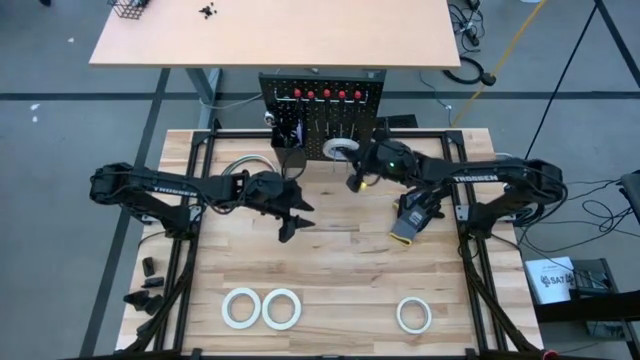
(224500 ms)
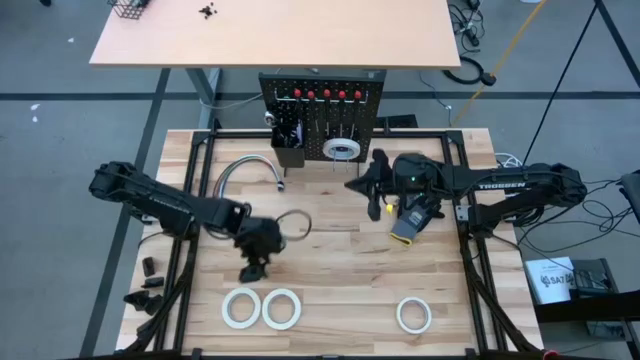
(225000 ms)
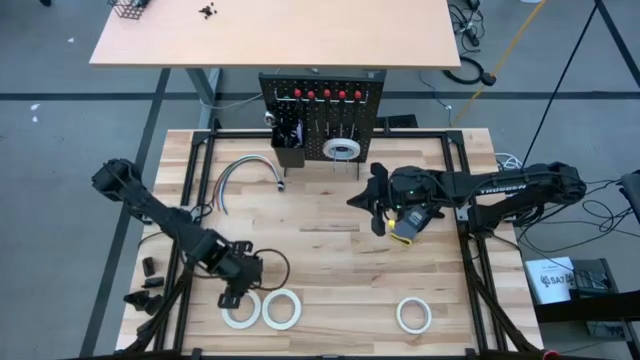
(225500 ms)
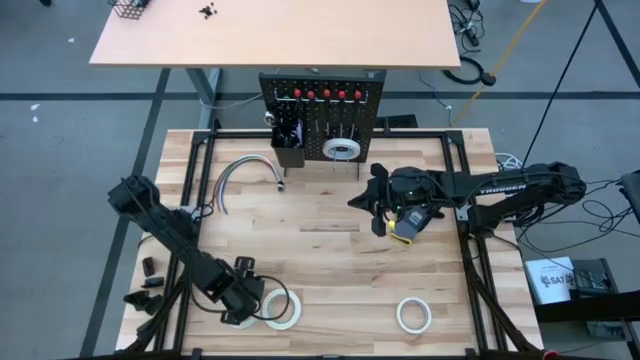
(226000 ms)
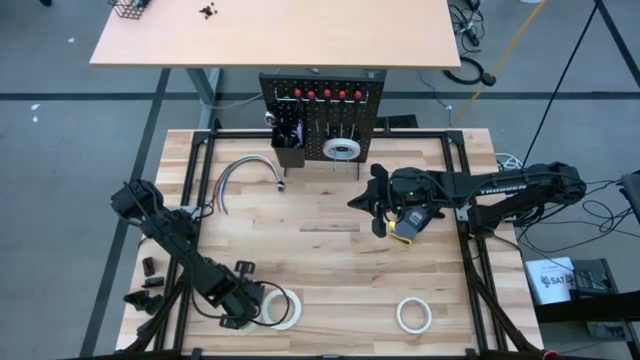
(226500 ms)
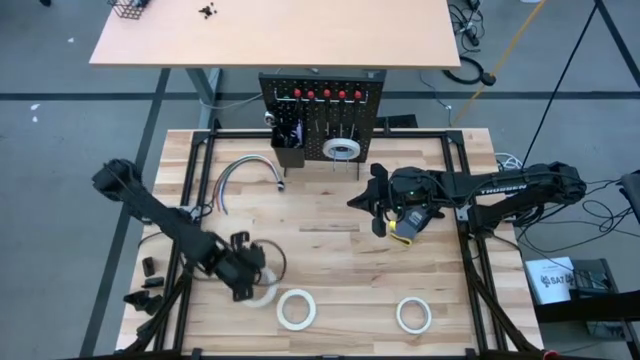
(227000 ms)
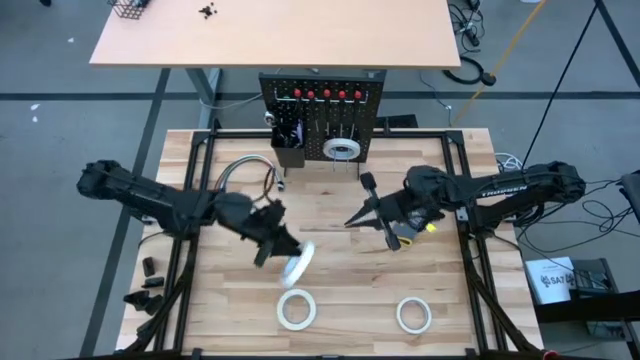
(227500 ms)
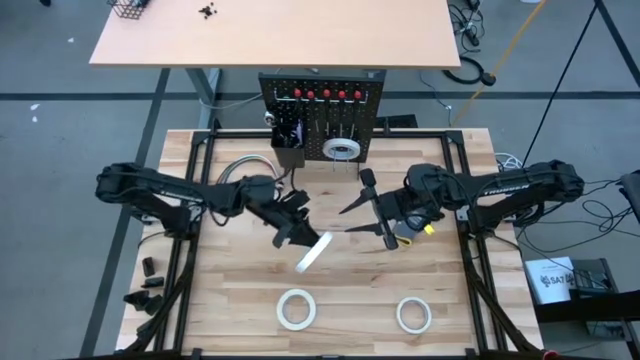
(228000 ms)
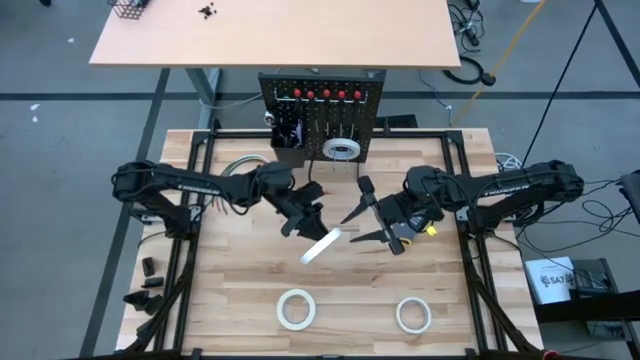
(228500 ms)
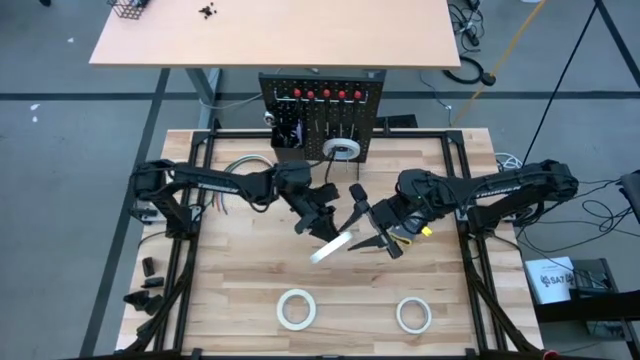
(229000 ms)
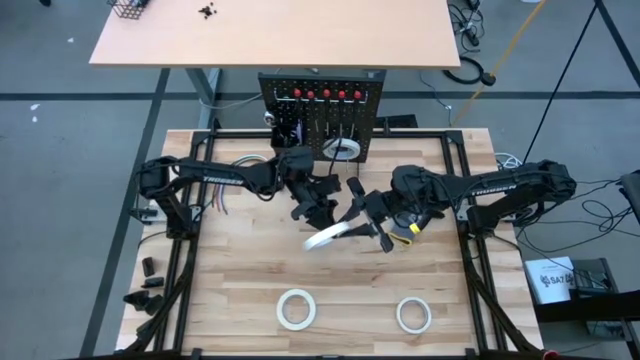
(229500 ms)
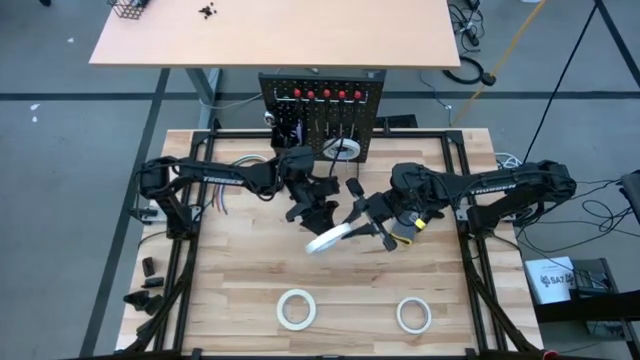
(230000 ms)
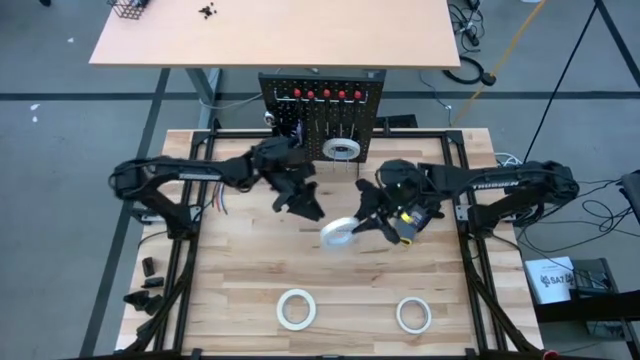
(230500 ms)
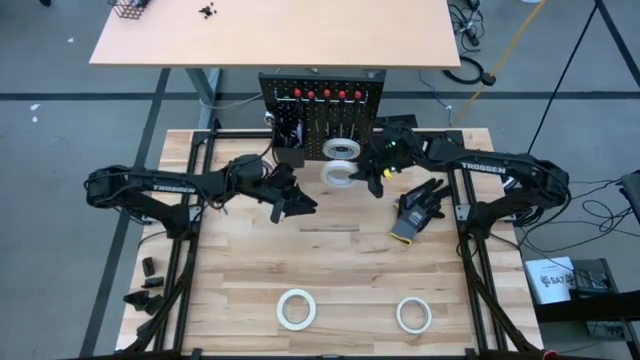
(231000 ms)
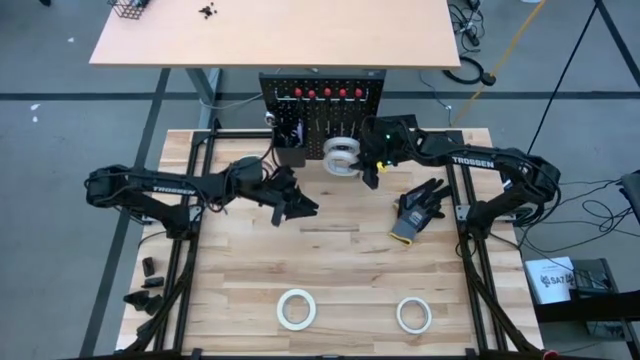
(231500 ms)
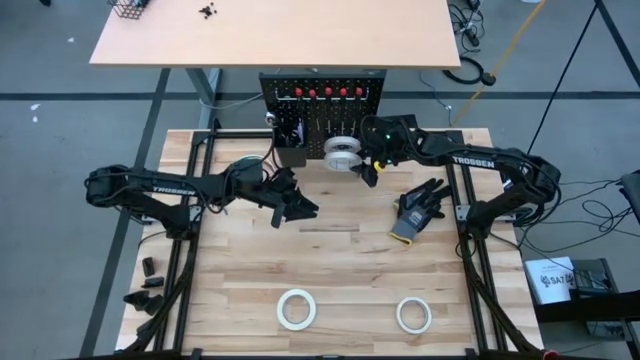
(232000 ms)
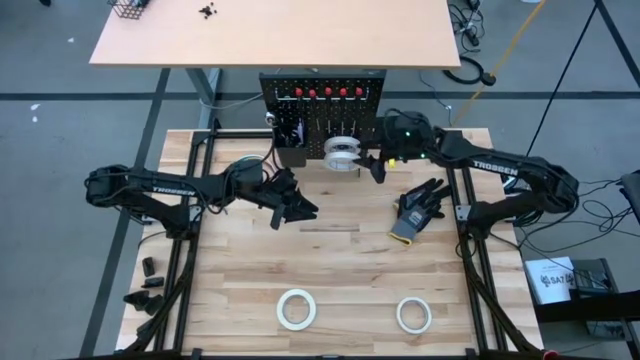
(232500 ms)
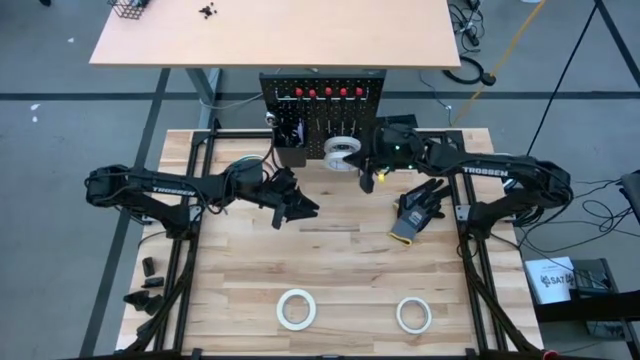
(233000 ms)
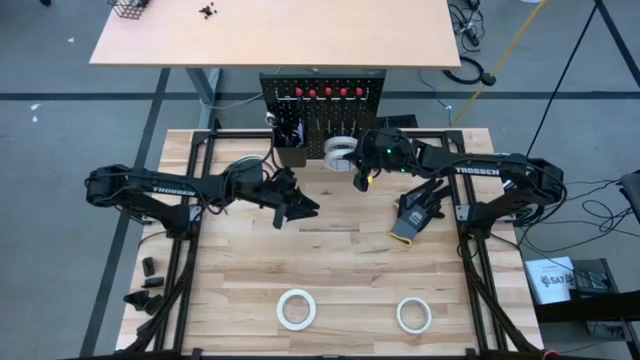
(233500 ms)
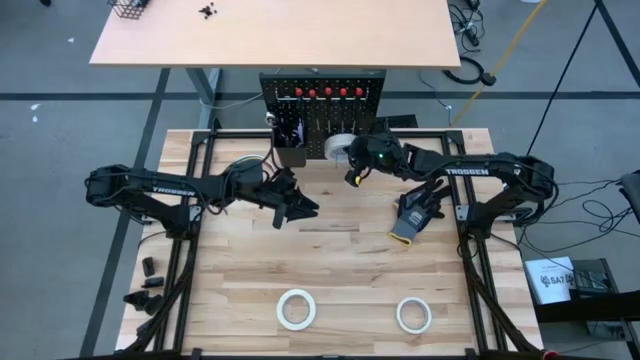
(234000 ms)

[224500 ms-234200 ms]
Task: Hang tools onto peg board
Hang the white tape on the peg board

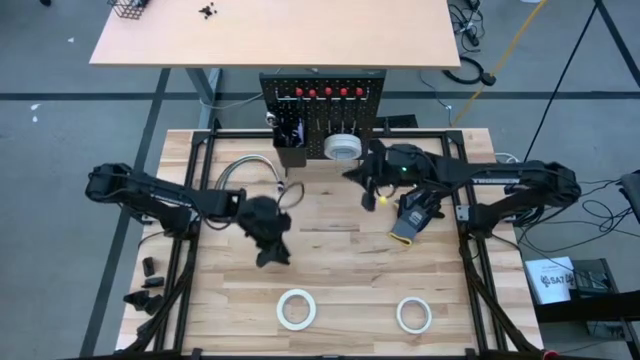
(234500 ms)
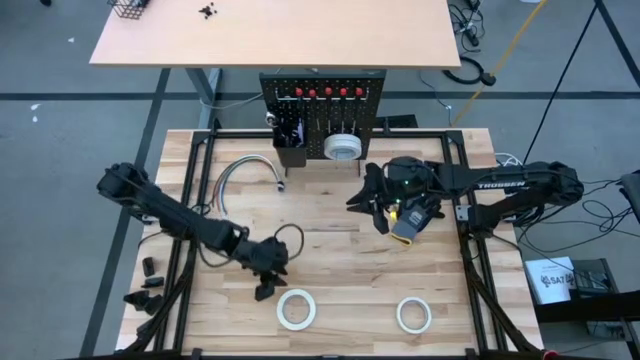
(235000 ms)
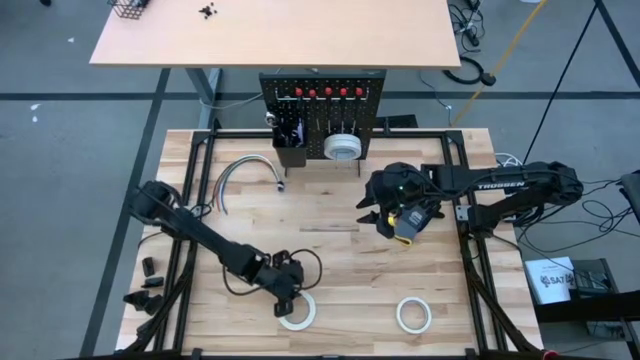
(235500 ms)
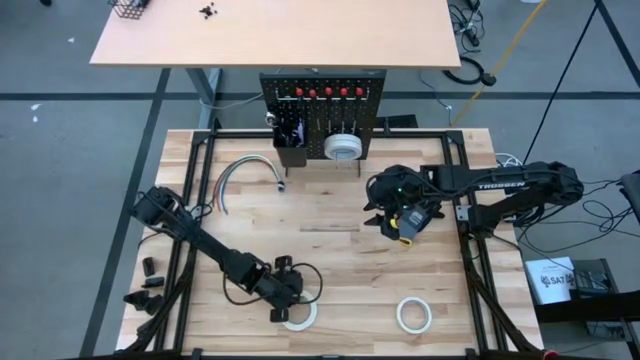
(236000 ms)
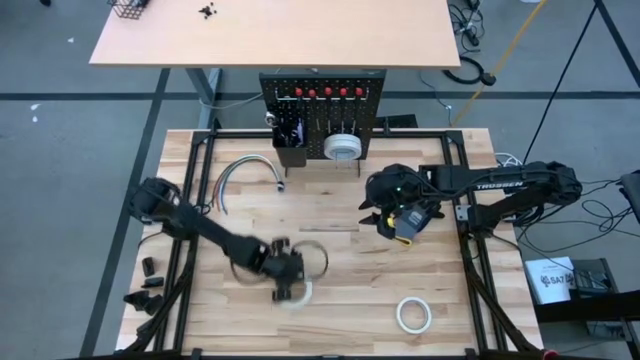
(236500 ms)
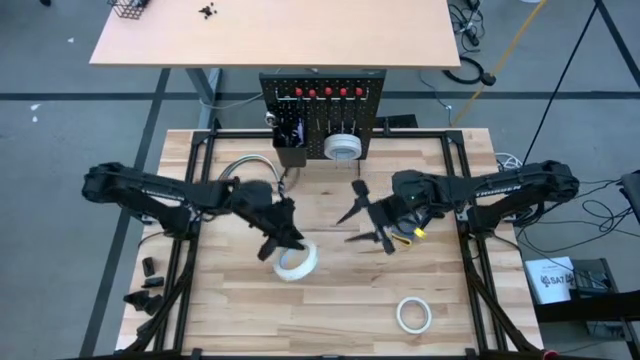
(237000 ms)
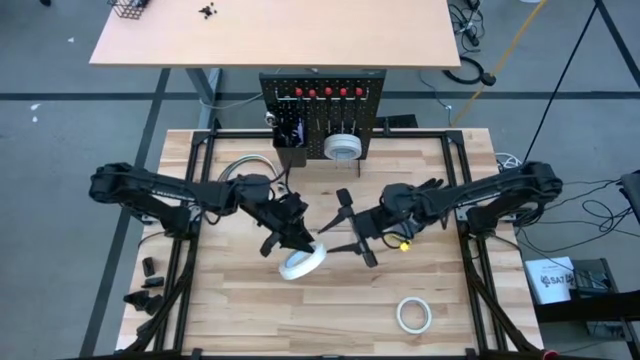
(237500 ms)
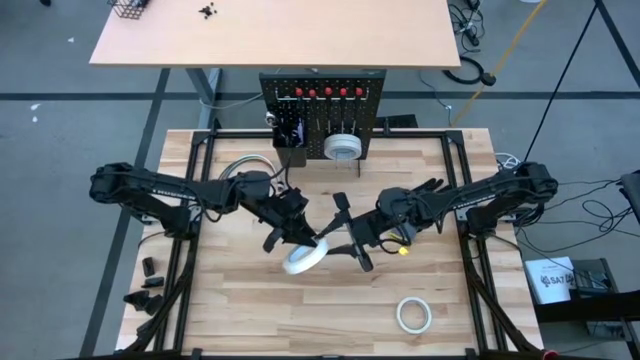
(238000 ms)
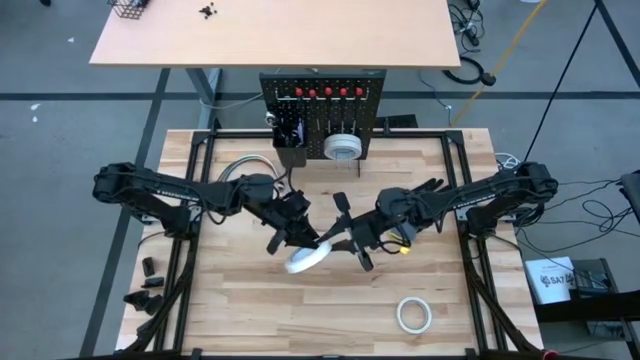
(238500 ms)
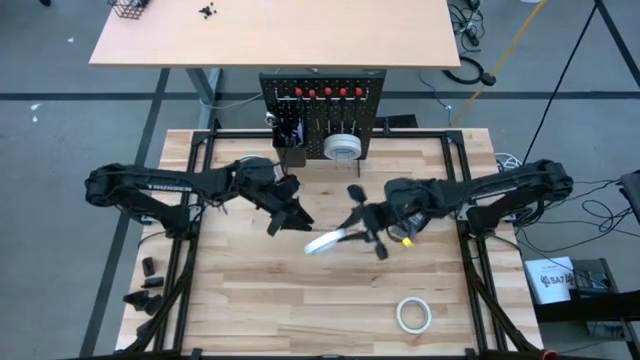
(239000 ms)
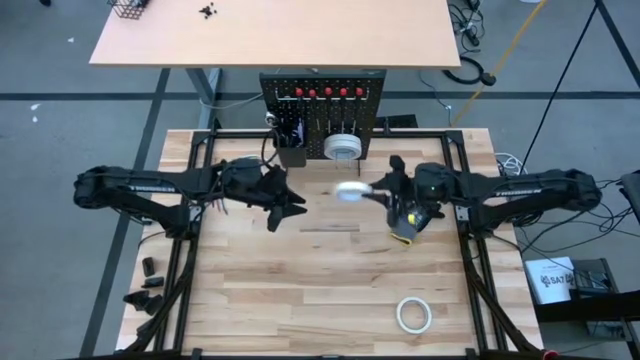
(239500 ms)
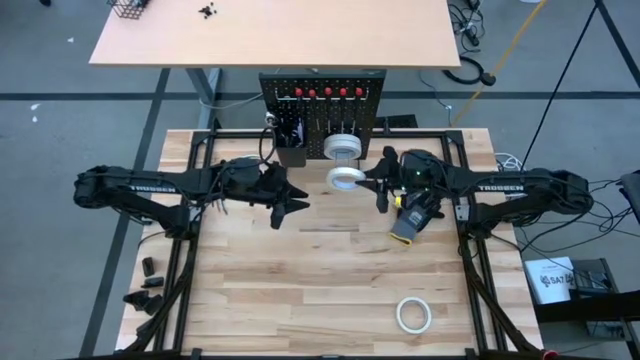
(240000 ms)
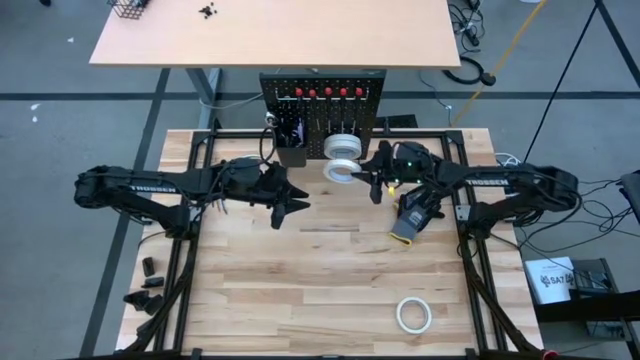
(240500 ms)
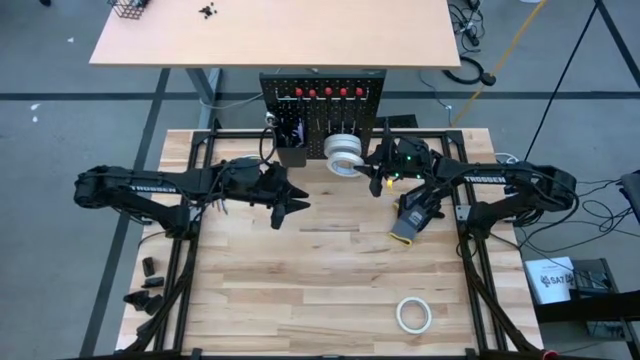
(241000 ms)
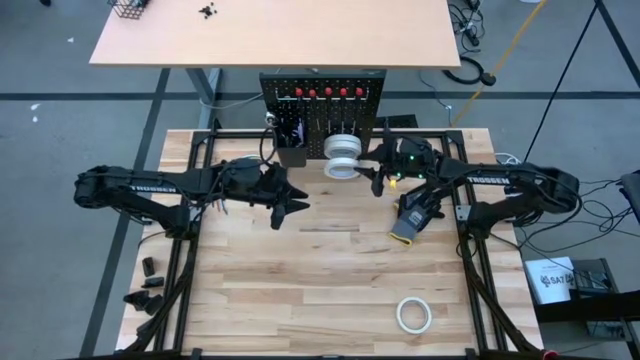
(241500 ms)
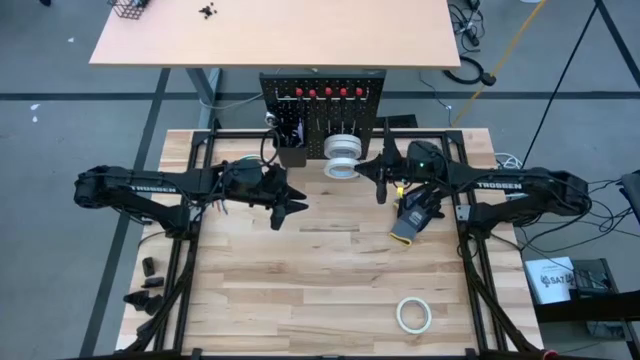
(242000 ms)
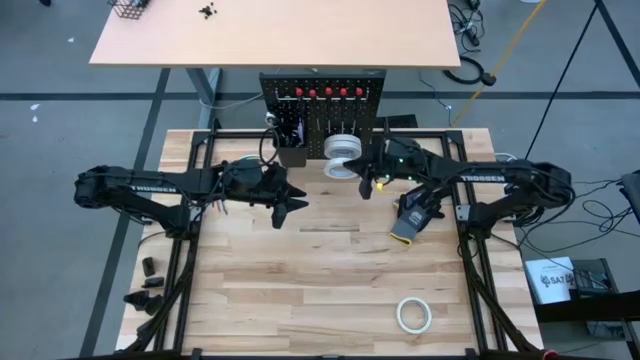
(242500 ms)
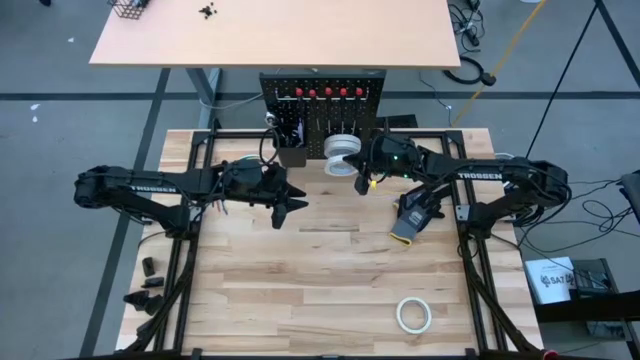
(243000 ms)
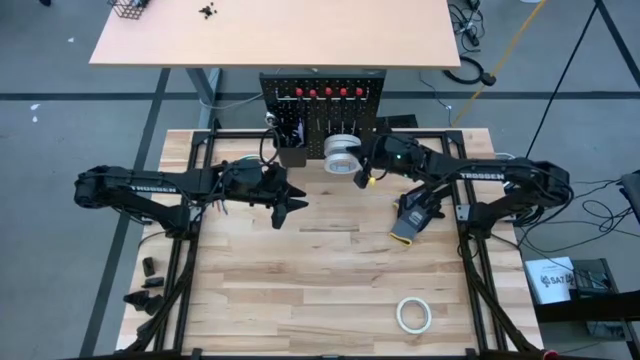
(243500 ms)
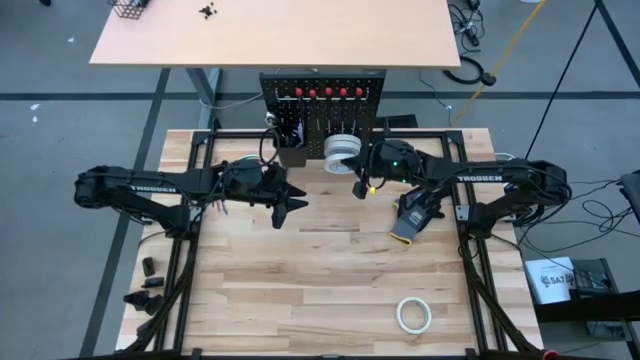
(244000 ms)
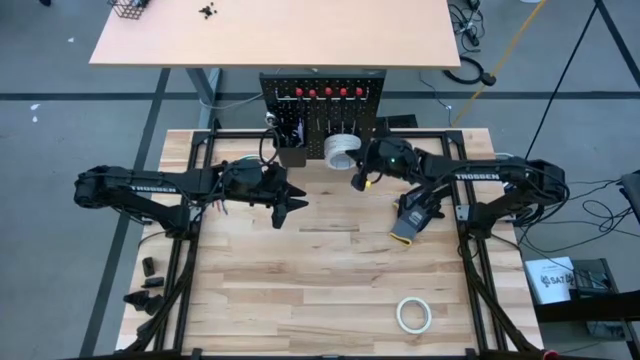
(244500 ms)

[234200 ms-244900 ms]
Hang the white tape on the peg board

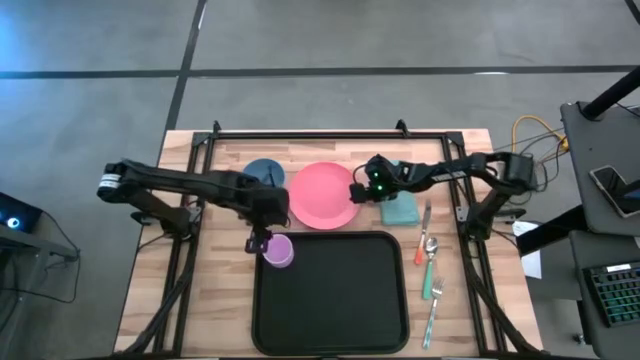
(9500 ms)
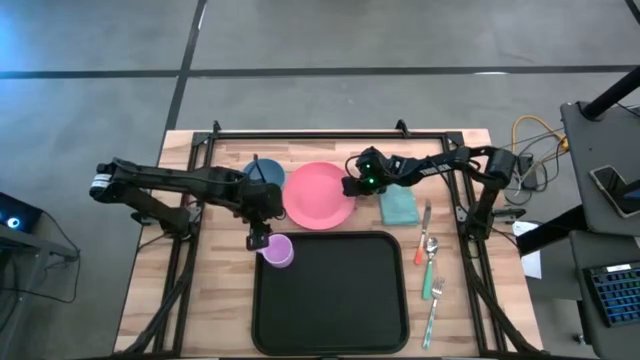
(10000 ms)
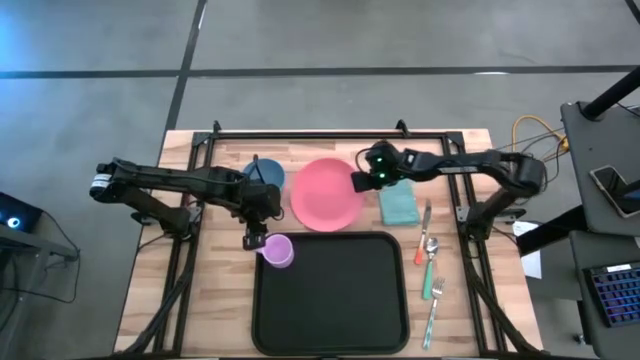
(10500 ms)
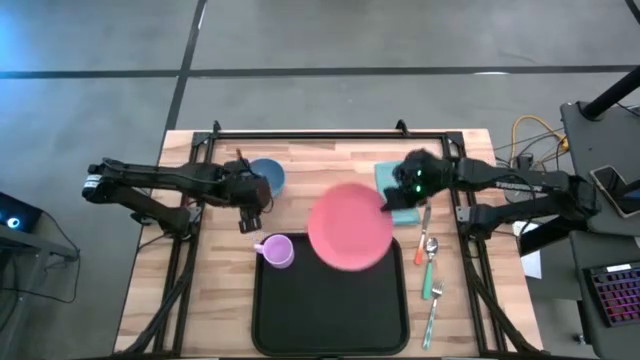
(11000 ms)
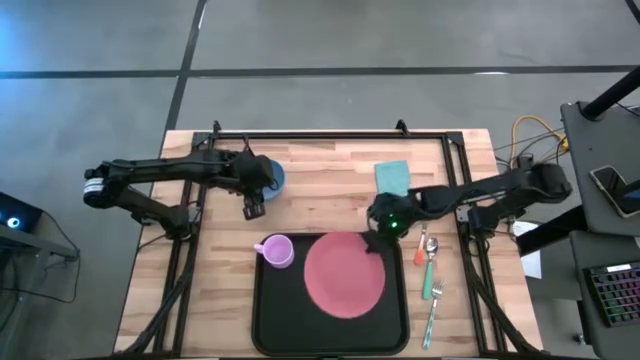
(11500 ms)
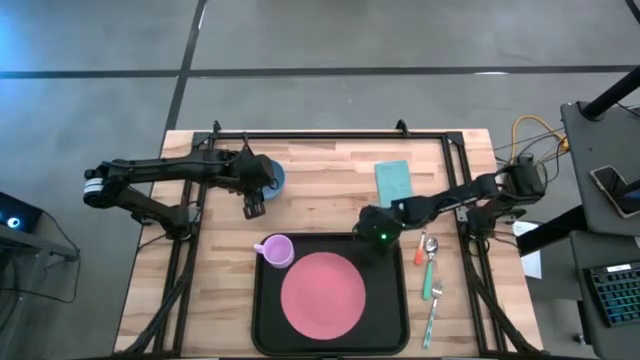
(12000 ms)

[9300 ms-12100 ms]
Task: Set up tray
Put the pink plate on the black serving tray
